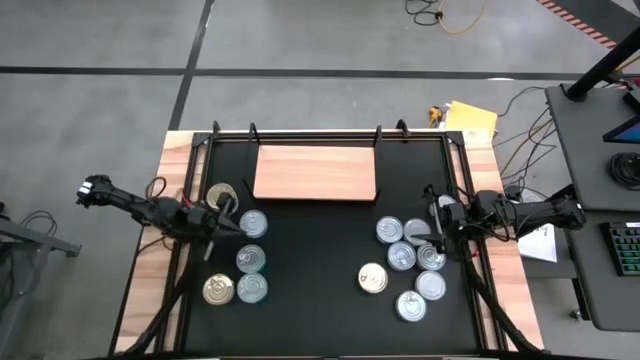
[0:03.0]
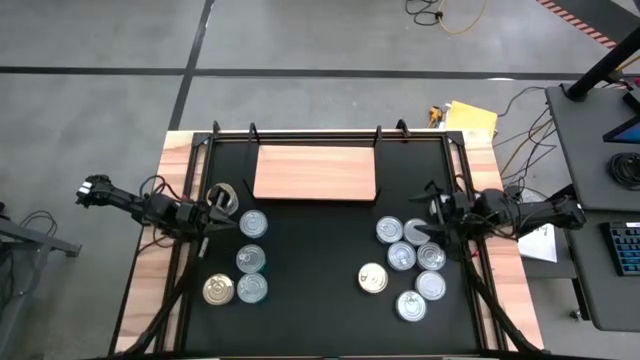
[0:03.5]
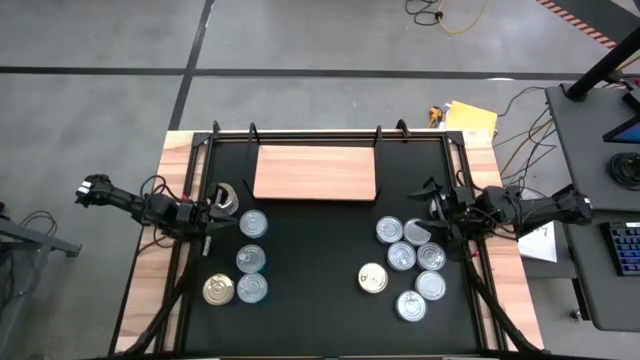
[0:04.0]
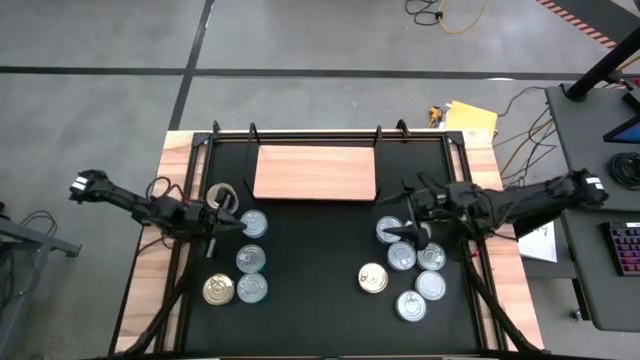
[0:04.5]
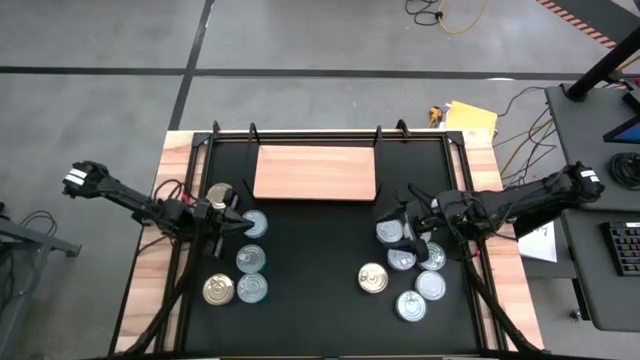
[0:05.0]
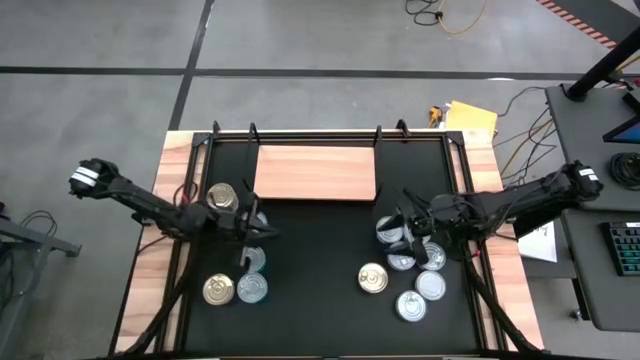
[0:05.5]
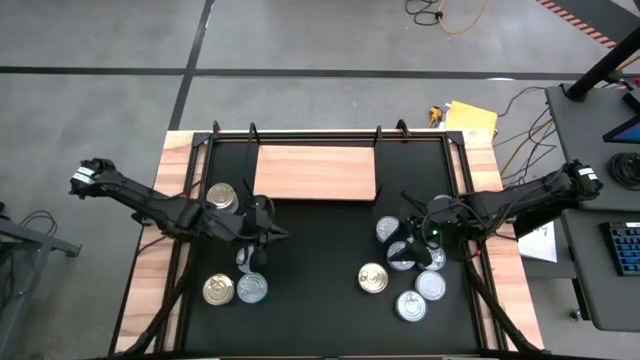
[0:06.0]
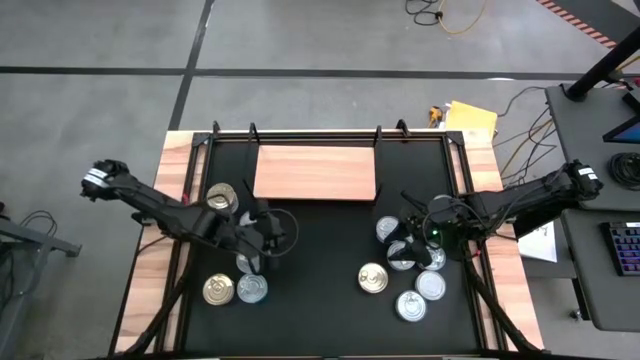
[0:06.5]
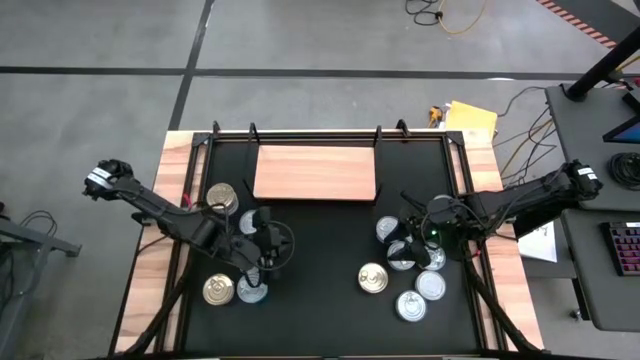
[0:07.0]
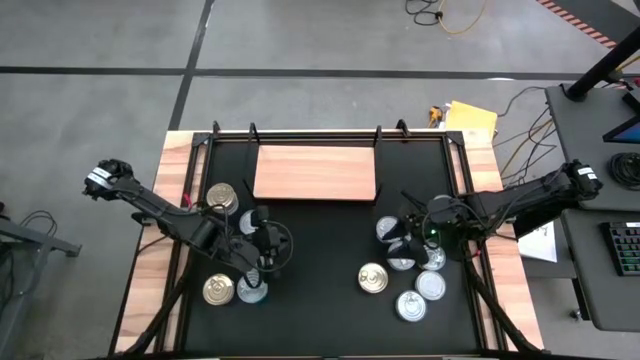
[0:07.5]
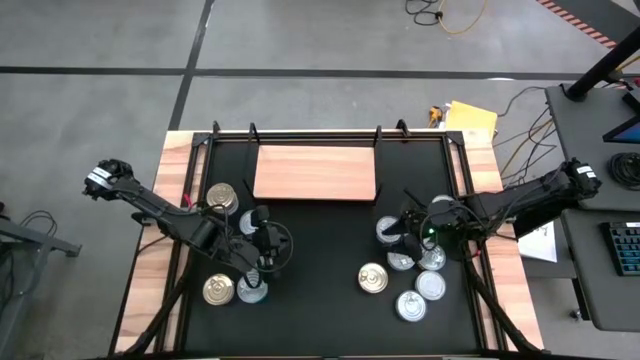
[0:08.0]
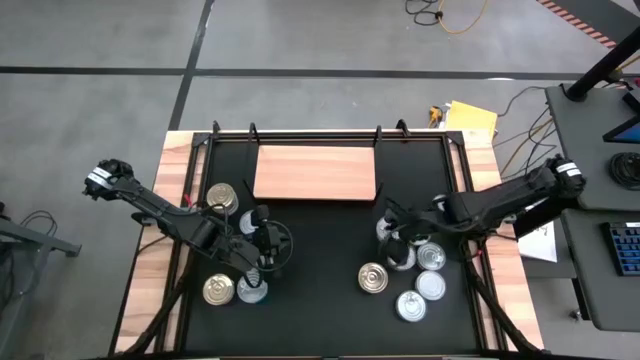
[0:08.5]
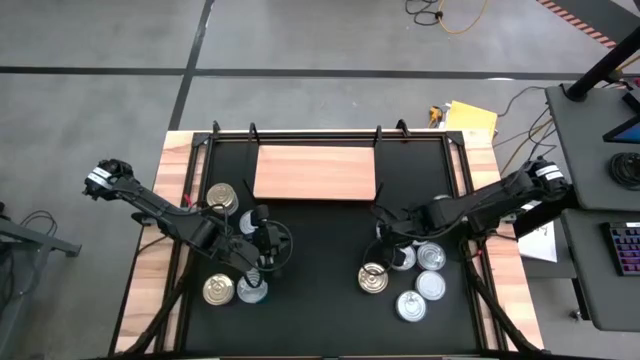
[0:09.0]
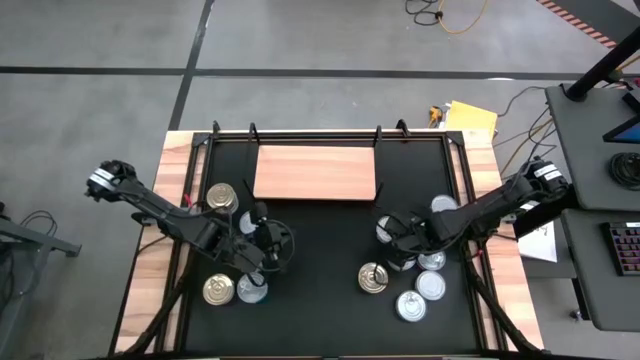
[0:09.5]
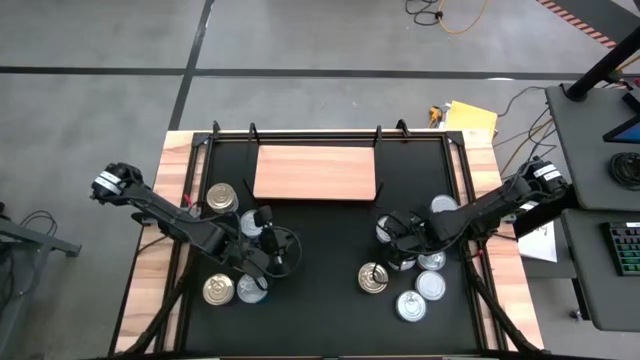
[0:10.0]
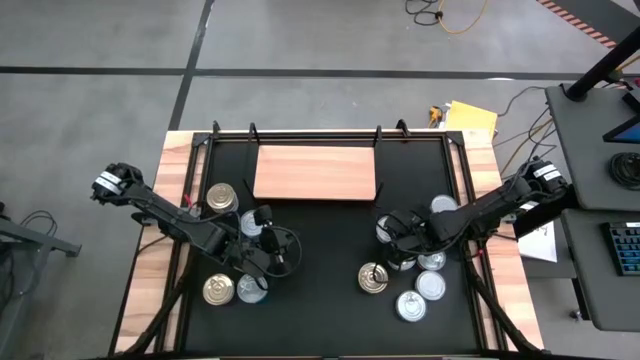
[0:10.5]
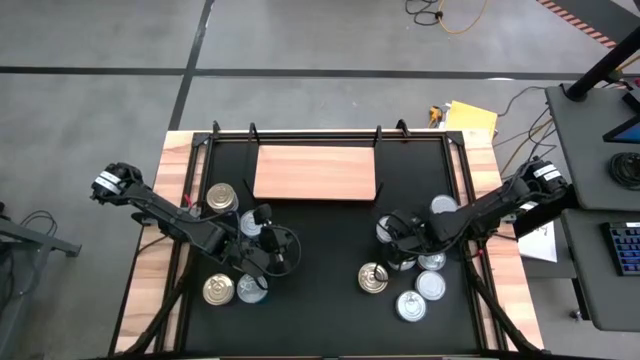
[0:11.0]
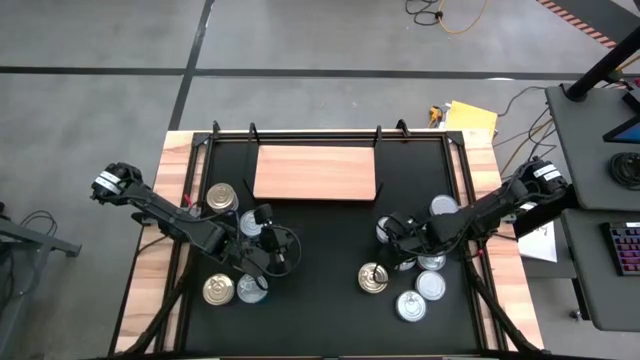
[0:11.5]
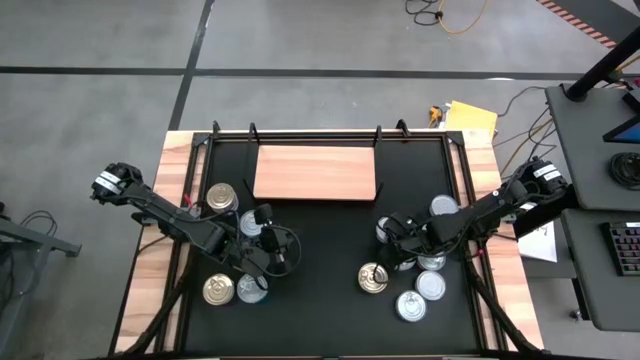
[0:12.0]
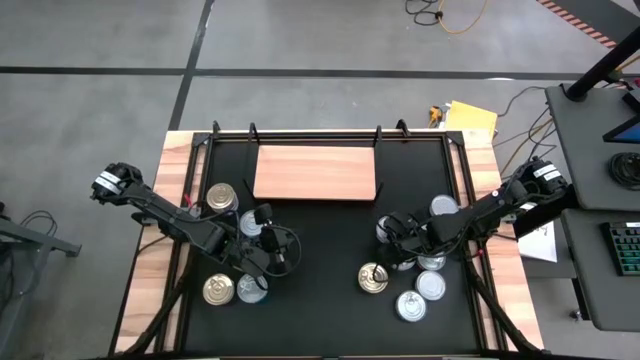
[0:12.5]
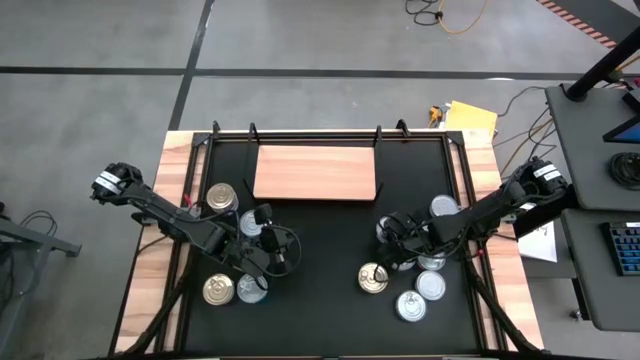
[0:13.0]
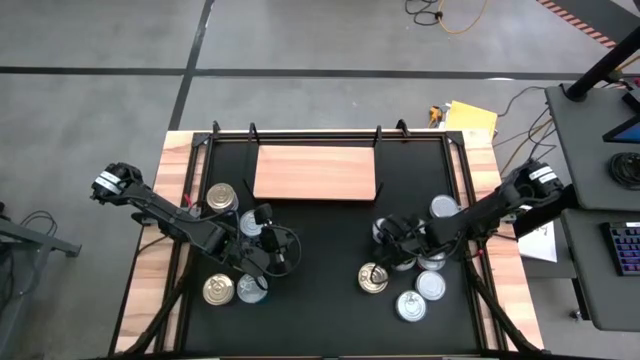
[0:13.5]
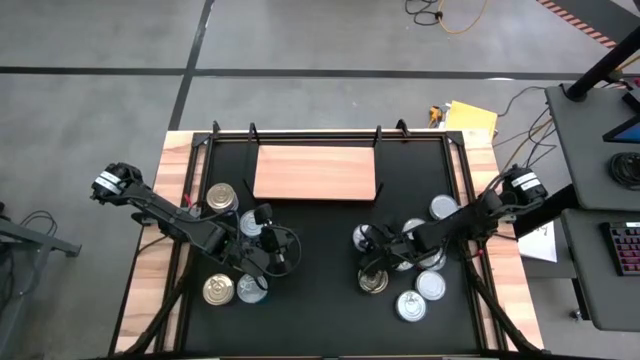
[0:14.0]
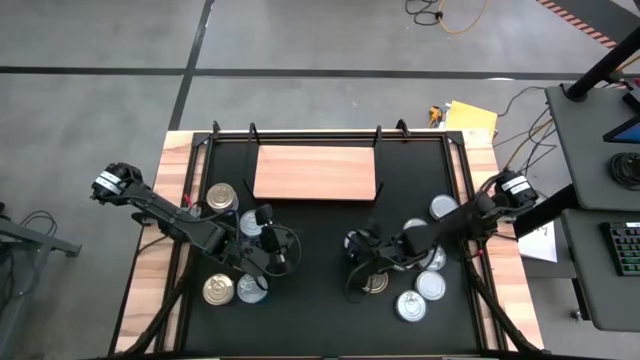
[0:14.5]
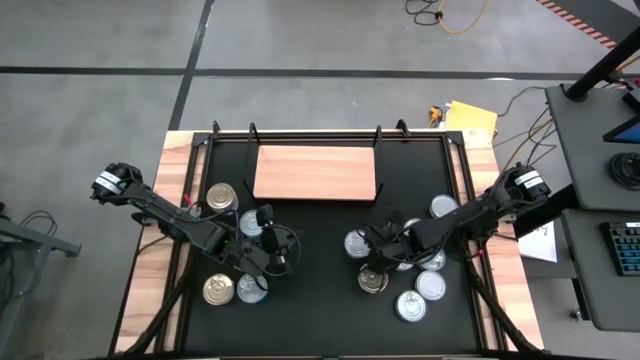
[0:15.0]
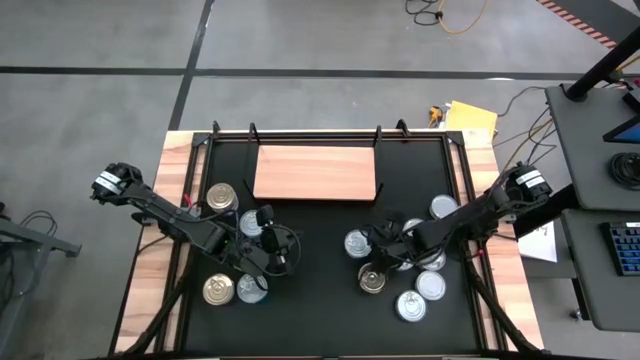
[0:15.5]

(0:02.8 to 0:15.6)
Task: Stack canned seafood by type on shelf
Put the blue tuna can on the shelf

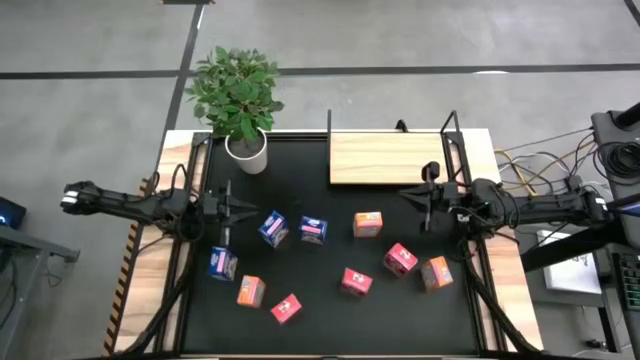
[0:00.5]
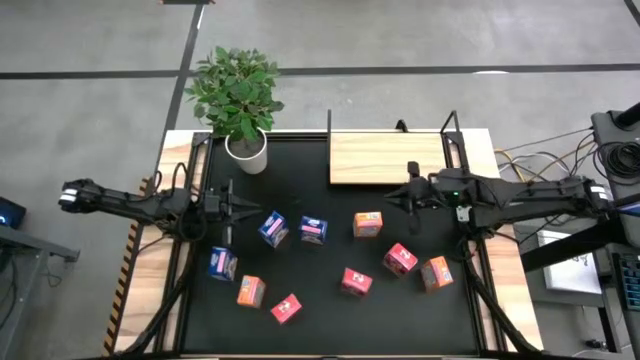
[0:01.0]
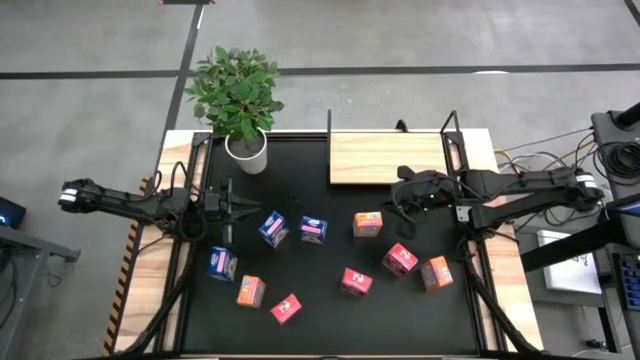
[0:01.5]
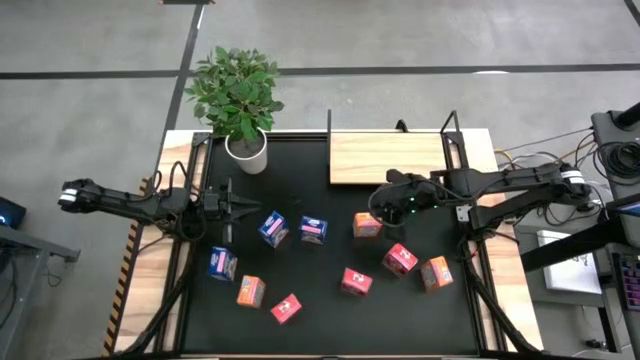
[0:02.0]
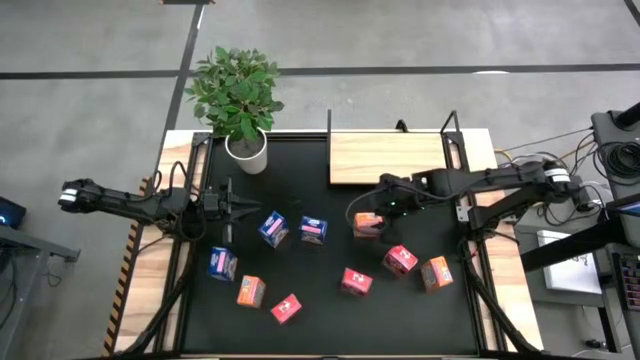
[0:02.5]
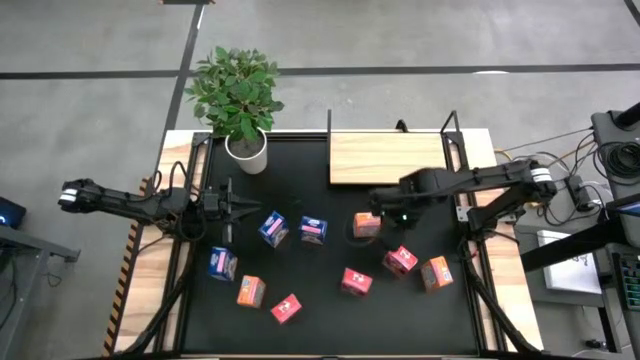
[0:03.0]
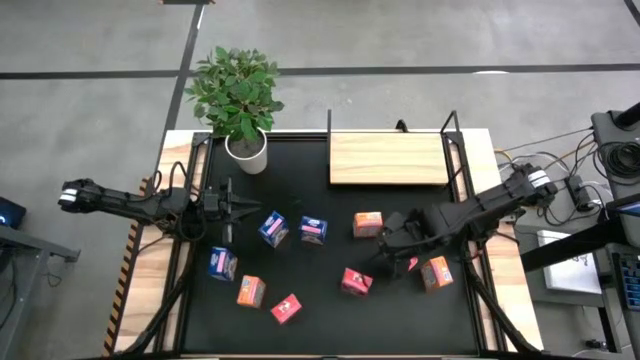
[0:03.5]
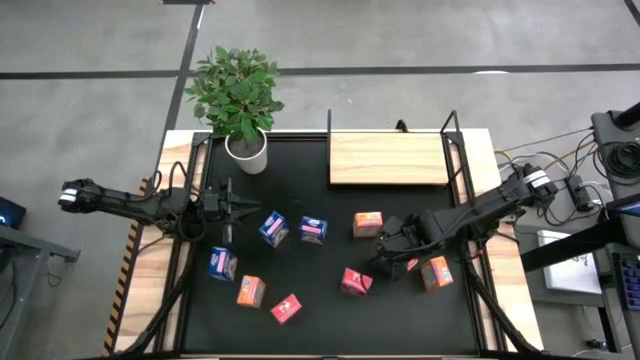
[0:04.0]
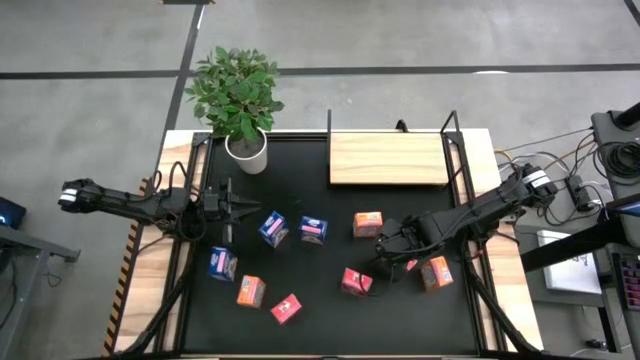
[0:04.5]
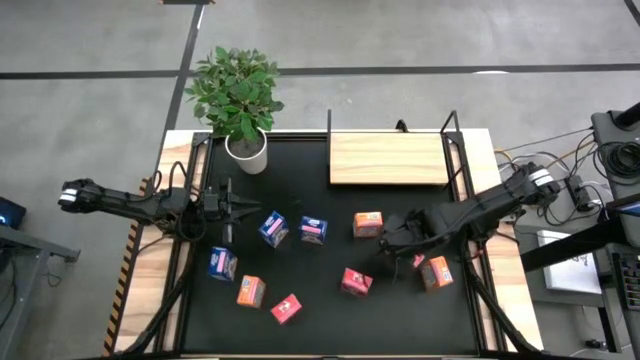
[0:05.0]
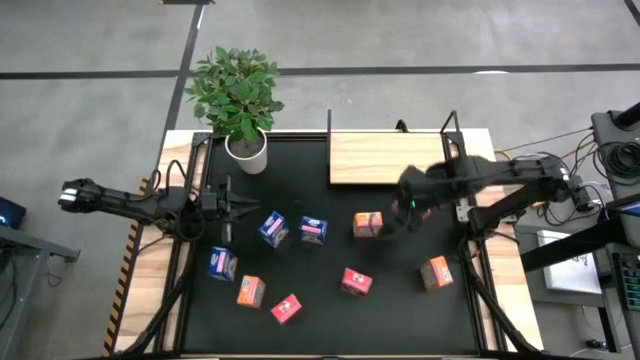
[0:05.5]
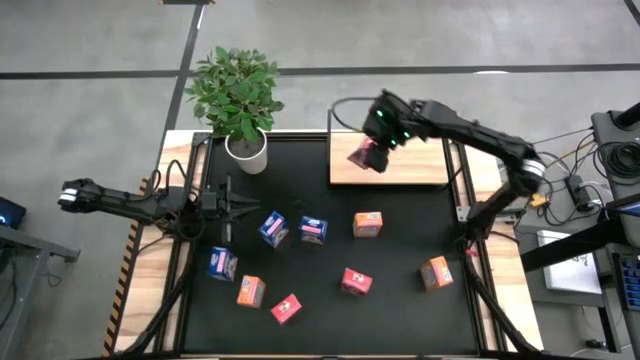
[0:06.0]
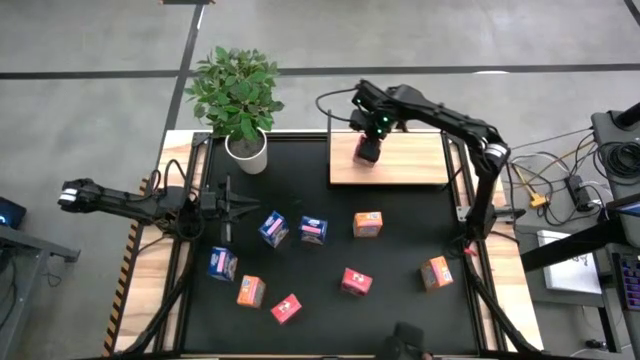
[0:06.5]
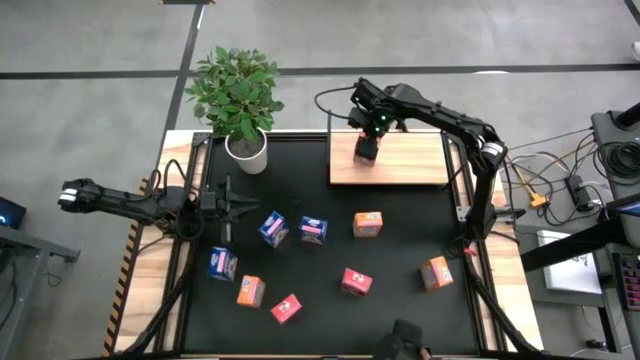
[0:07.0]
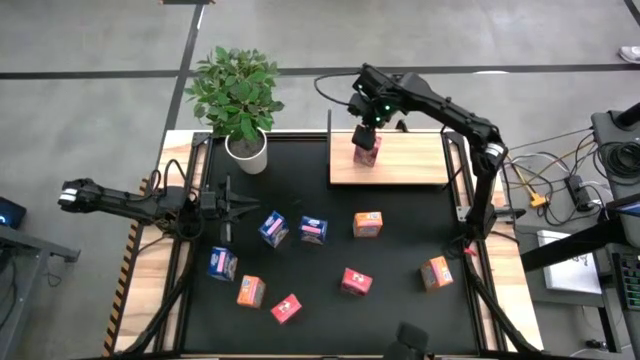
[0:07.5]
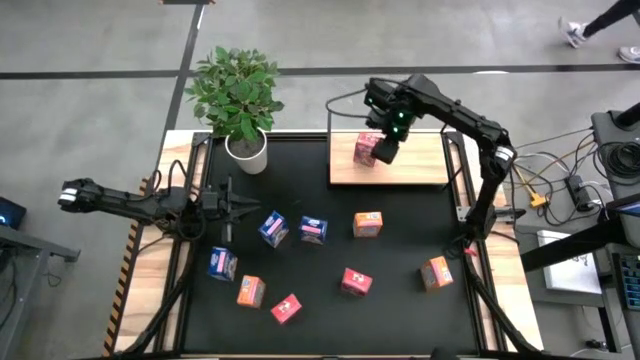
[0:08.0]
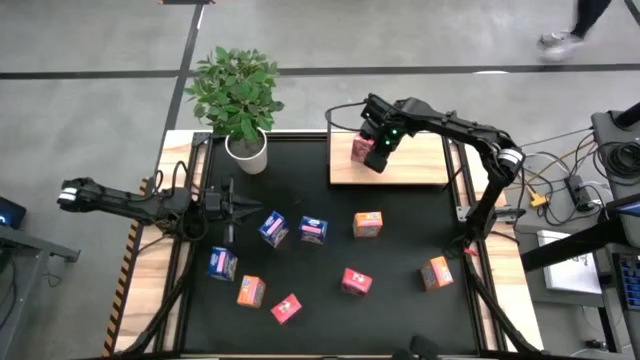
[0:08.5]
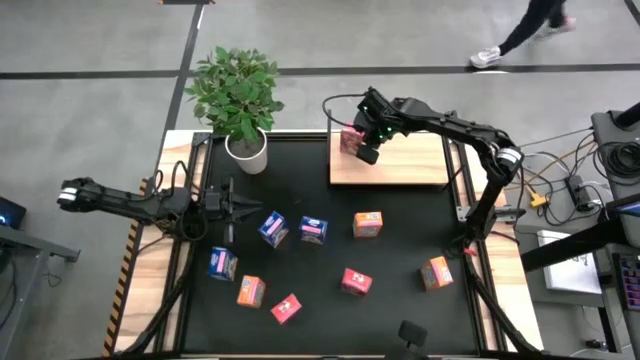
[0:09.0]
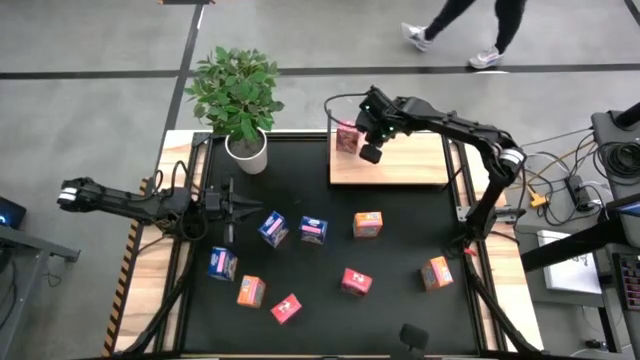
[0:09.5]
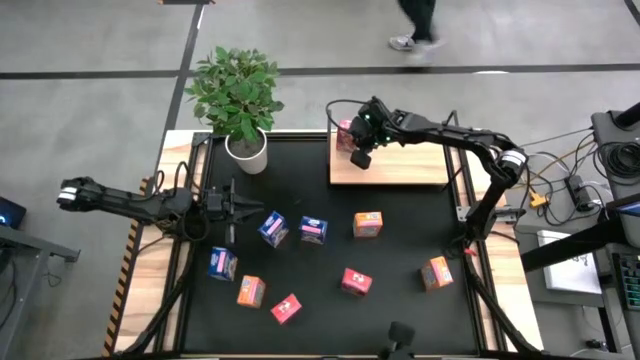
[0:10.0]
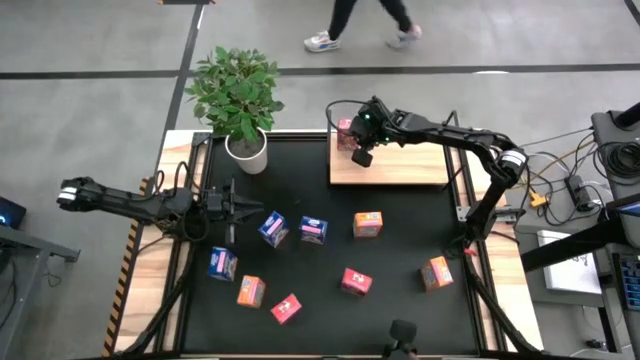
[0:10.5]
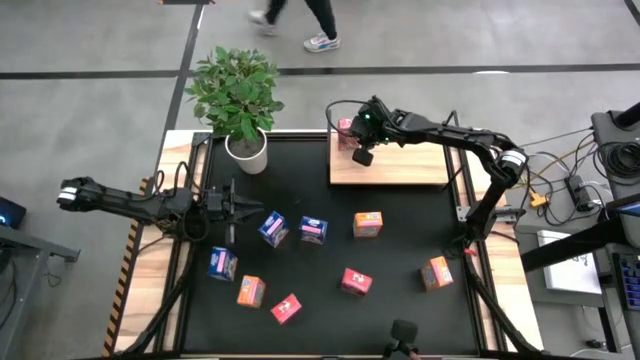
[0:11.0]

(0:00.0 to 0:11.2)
Task: Stack cereal on shelf
Put the top right red cereal box on the shelf
